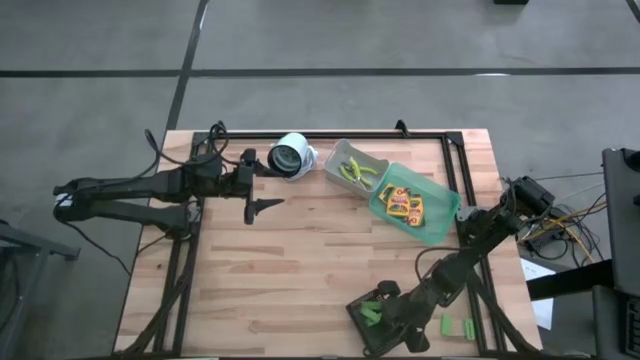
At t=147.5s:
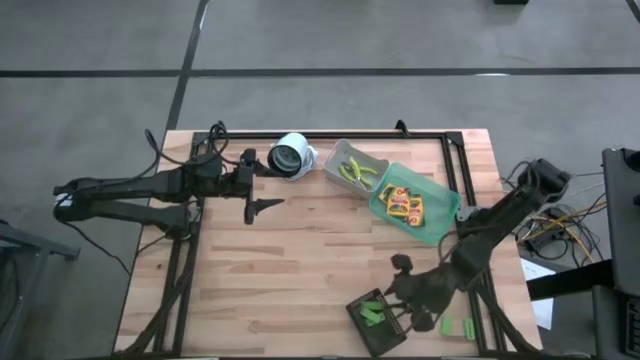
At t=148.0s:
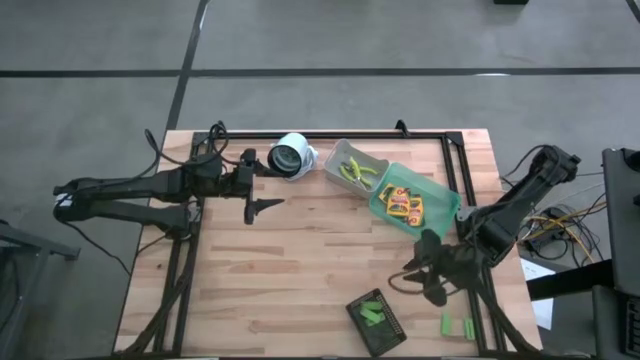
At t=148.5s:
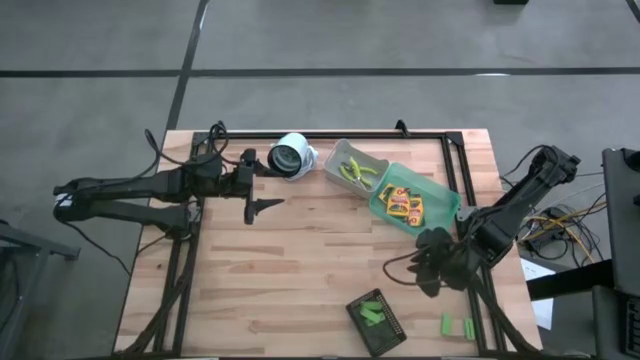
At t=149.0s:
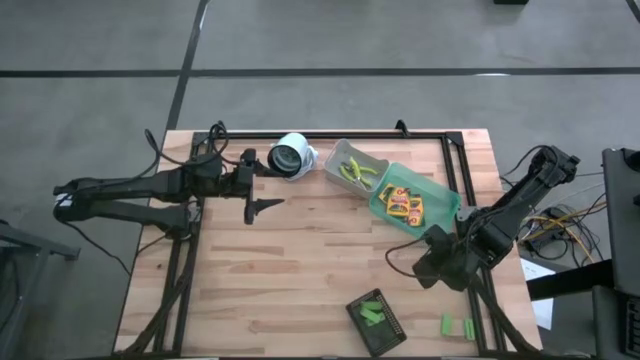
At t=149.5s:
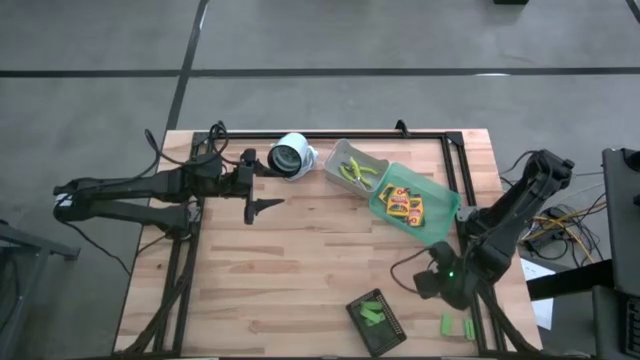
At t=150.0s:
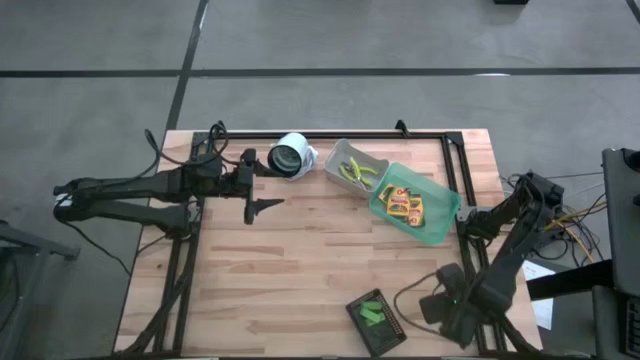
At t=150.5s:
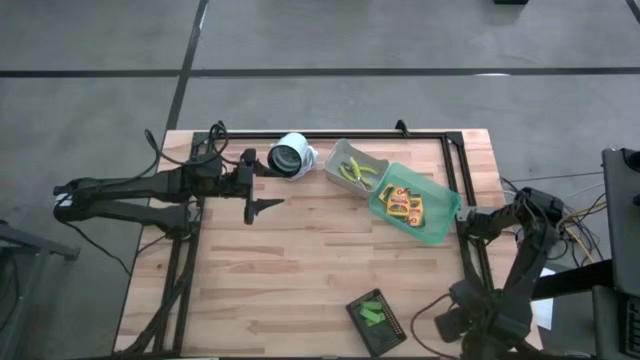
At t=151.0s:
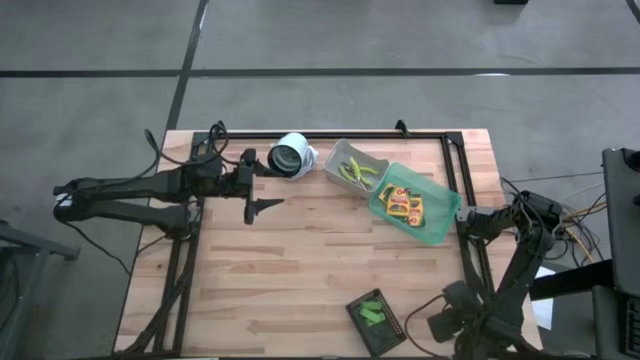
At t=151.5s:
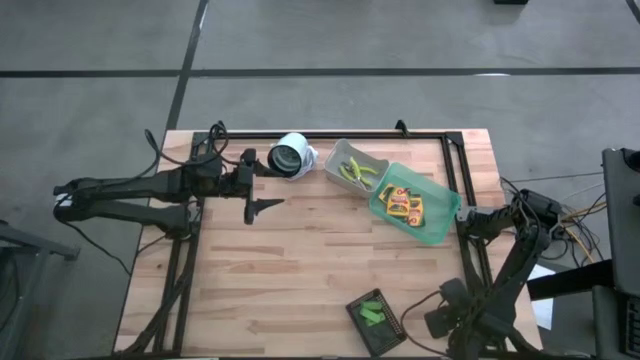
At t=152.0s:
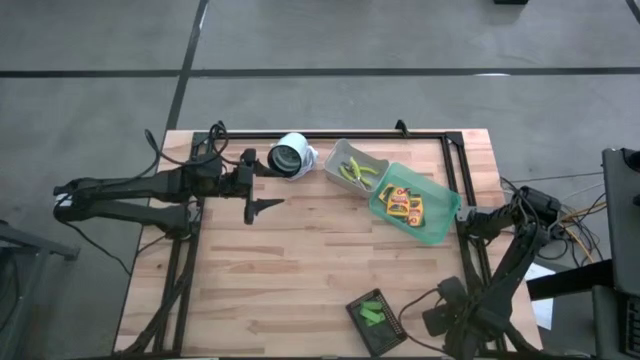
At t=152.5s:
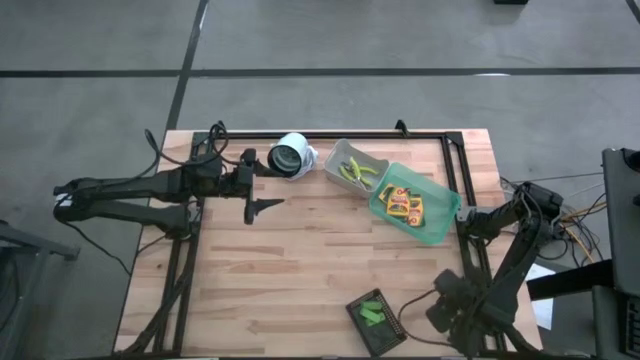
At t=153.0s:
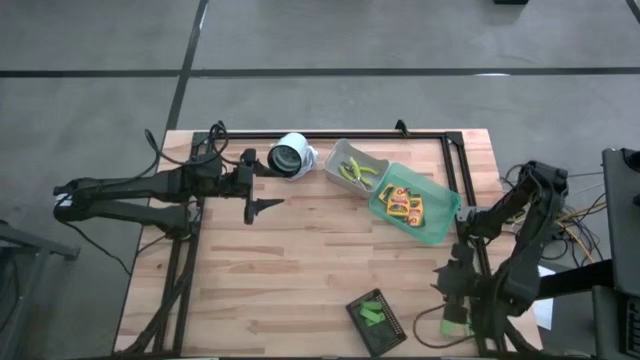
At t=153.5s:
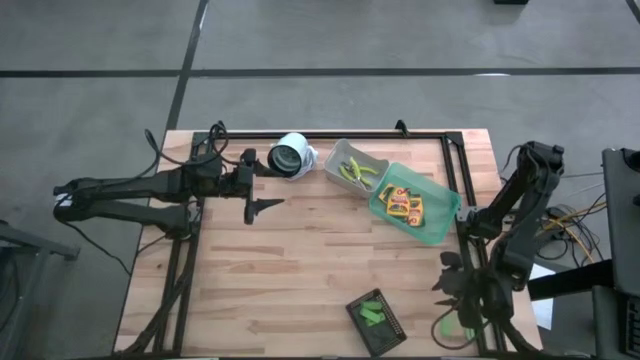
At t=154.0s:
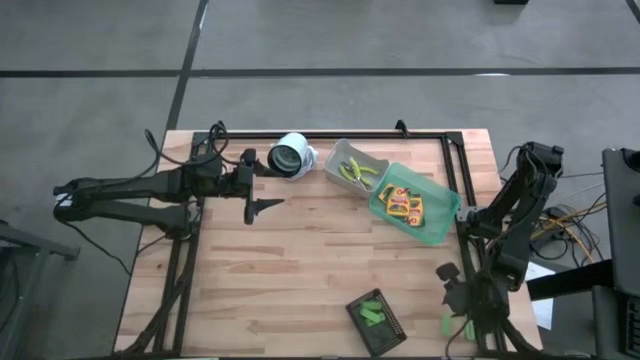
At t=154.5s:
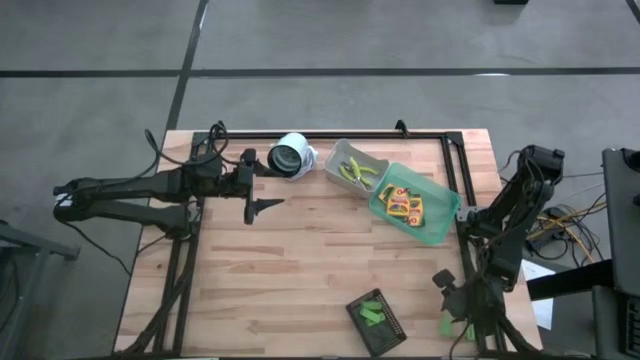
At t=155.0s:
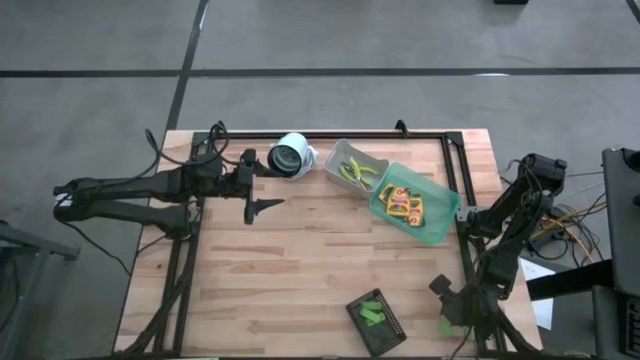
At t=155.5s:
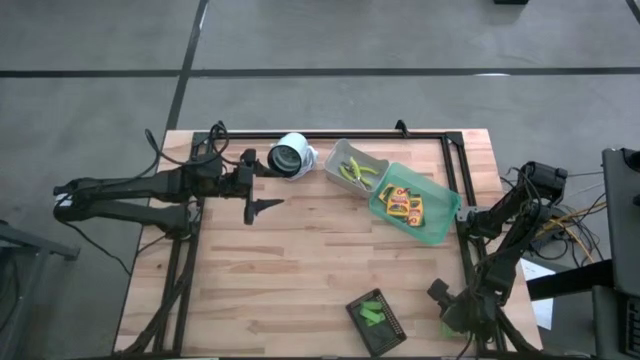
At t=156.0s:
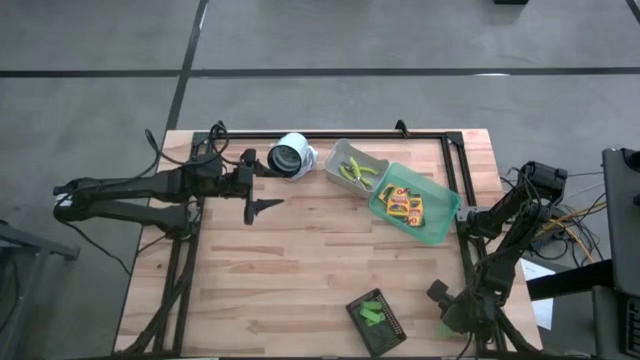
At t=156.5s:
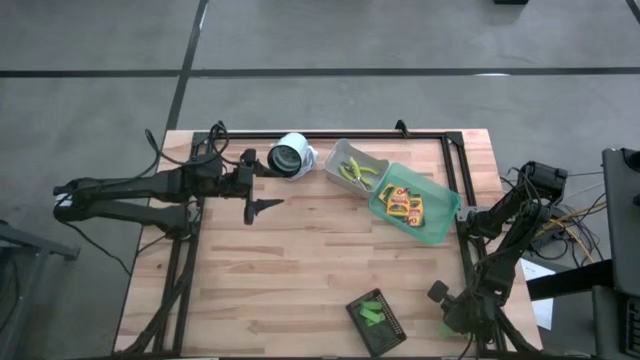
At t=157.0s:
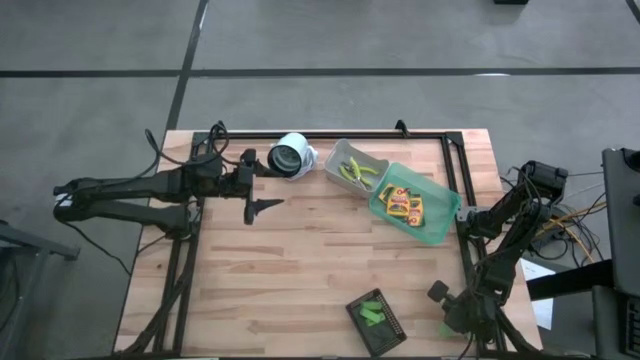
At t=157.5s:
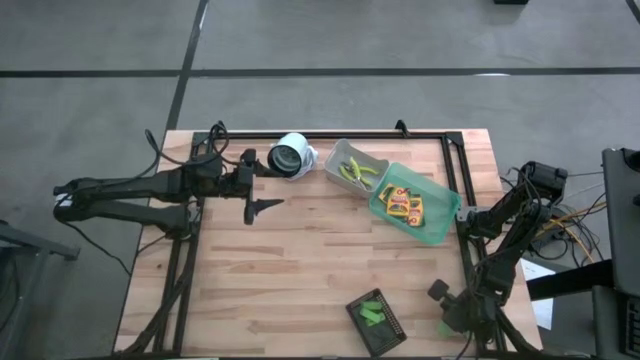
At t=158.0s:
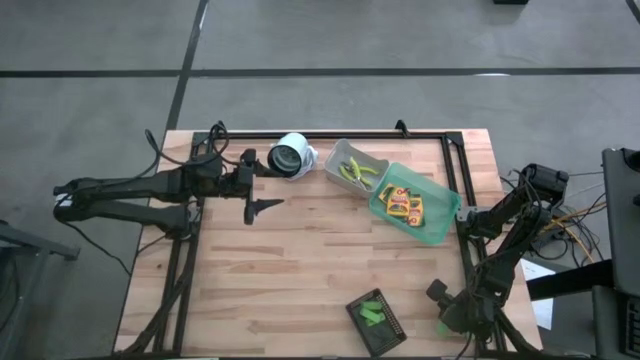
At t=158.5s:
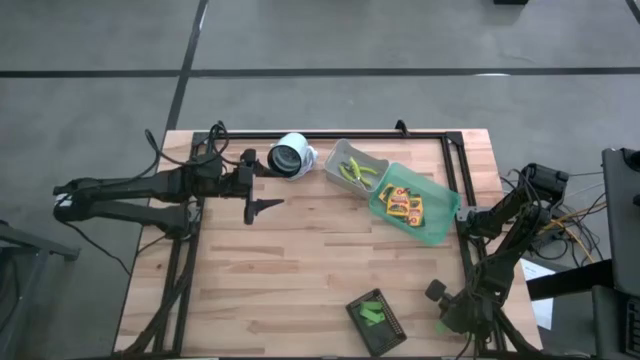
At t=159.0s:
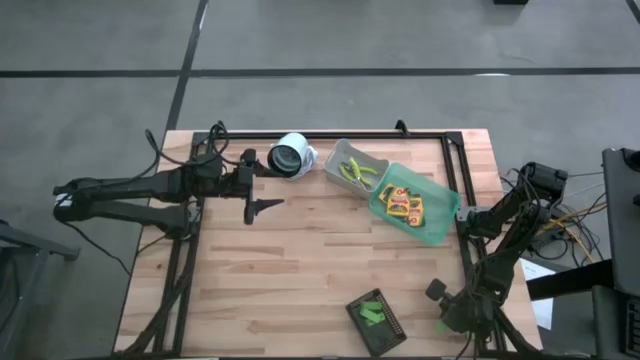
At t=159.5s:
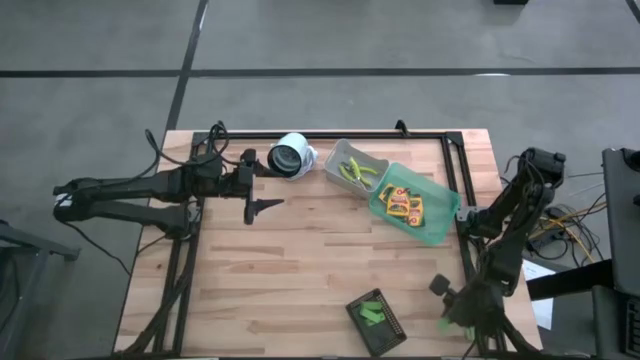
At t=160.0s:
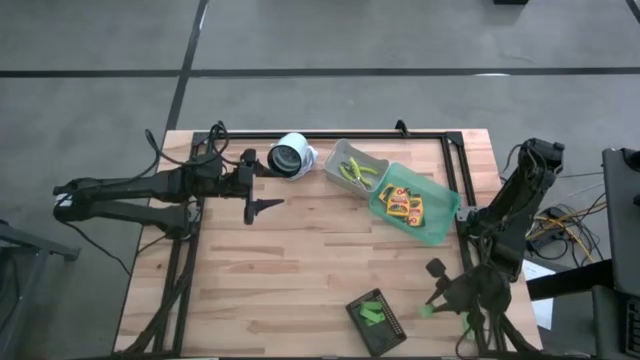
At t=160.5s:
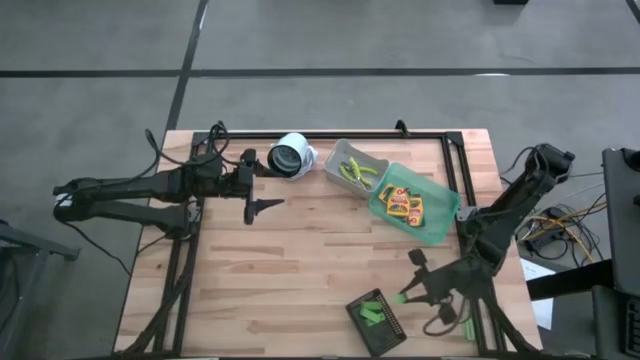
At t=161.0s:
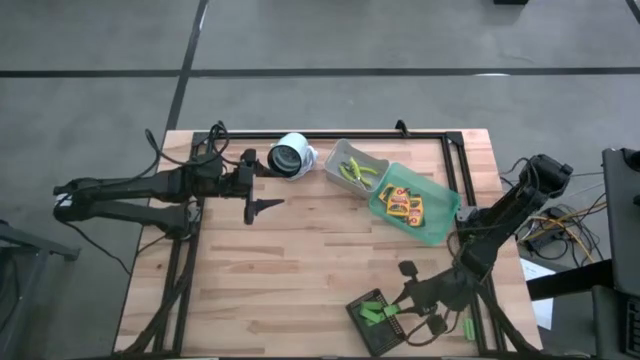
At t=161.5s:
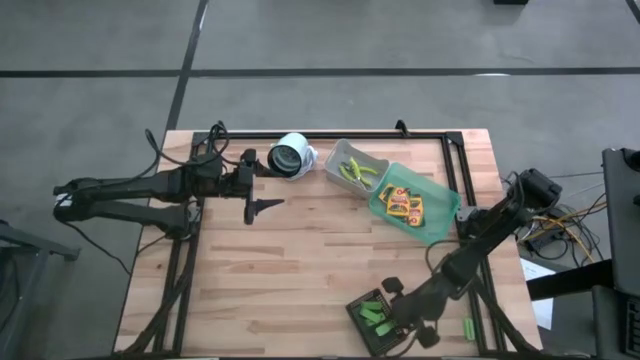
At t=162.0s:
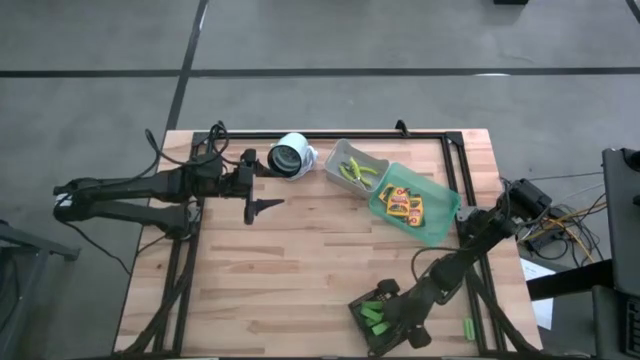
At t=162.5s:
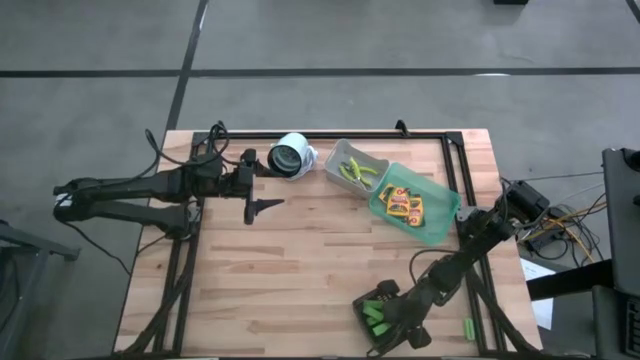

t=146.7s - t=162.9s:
Task: Pick & Place School Supplies
Put the green eraser into the black bin

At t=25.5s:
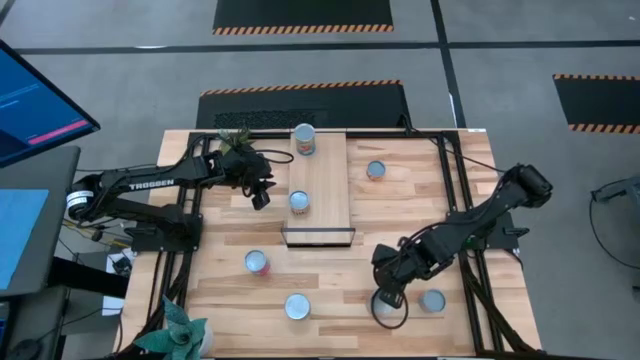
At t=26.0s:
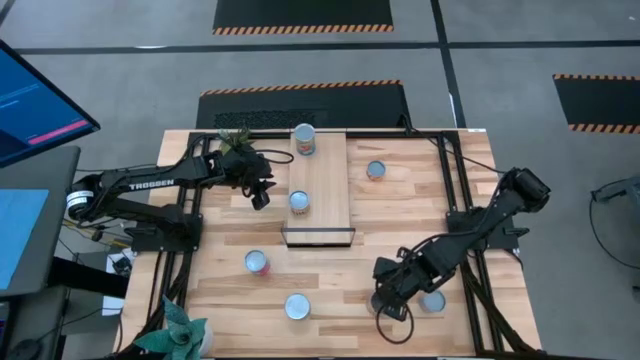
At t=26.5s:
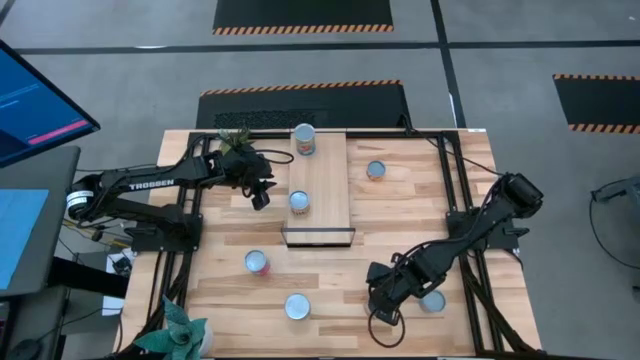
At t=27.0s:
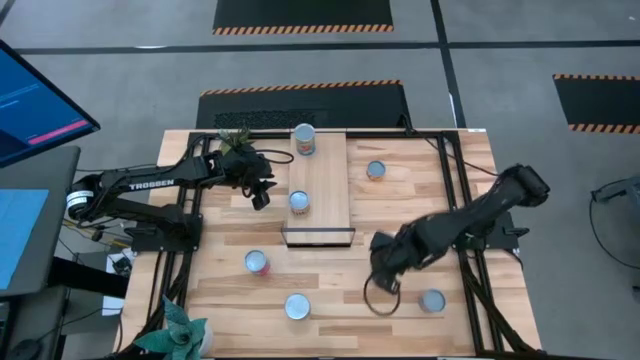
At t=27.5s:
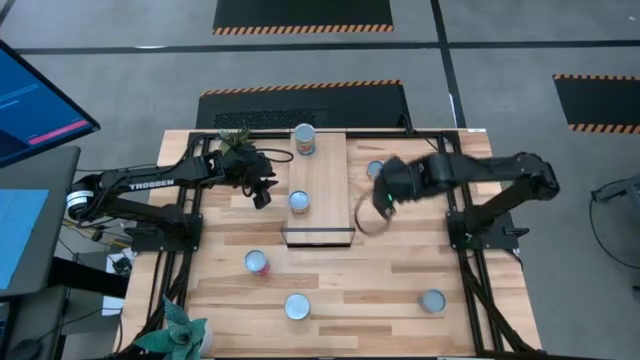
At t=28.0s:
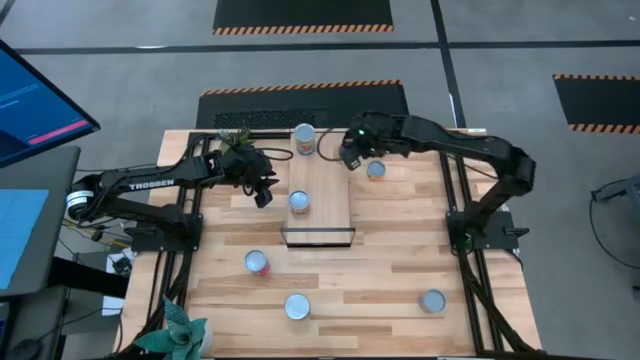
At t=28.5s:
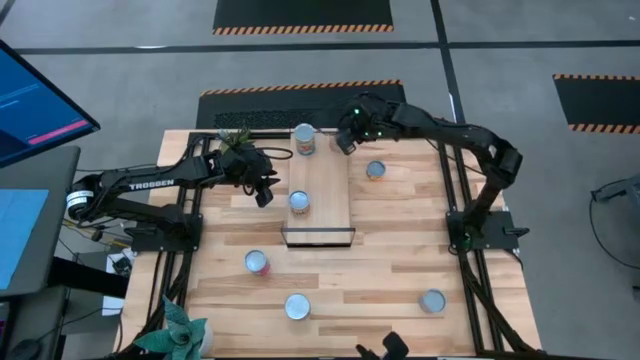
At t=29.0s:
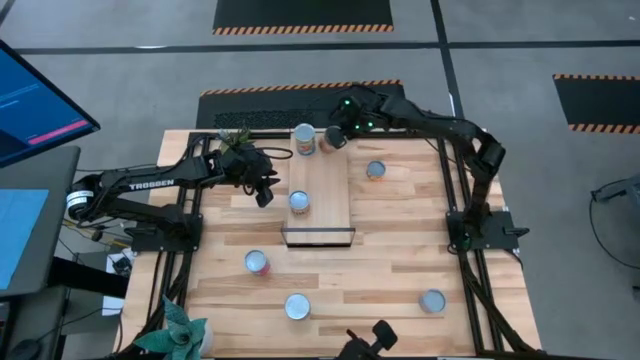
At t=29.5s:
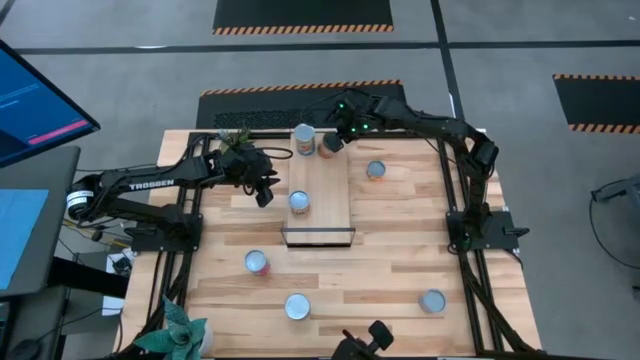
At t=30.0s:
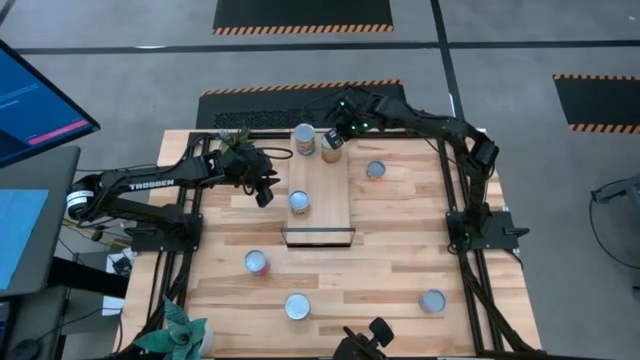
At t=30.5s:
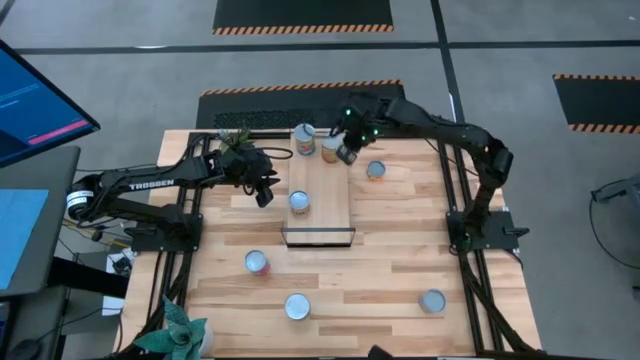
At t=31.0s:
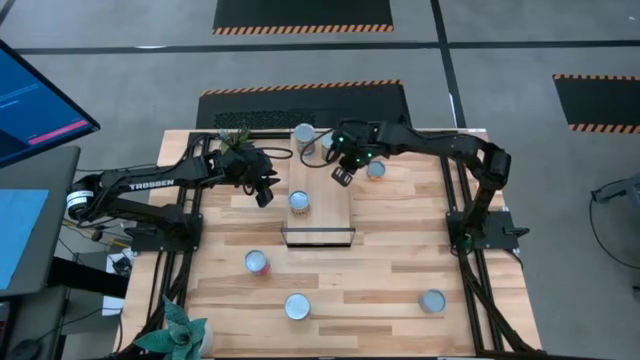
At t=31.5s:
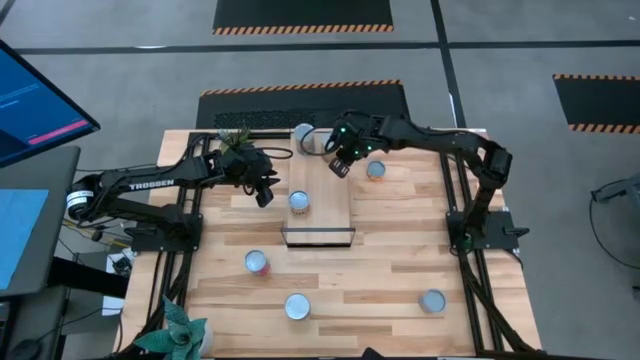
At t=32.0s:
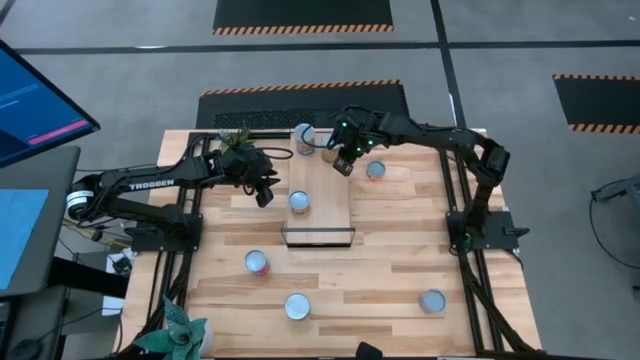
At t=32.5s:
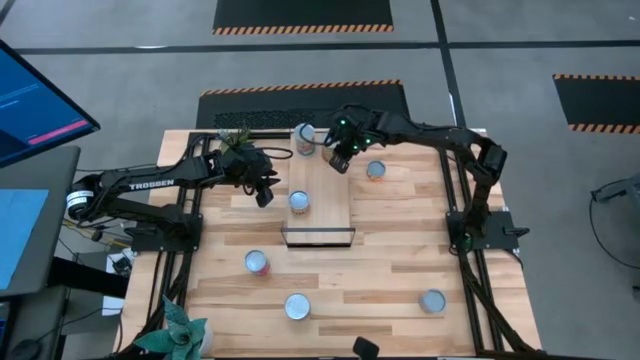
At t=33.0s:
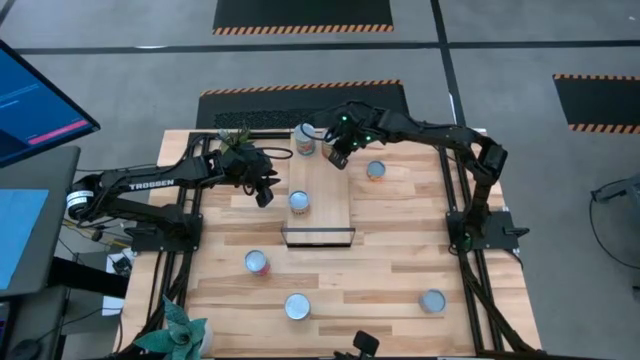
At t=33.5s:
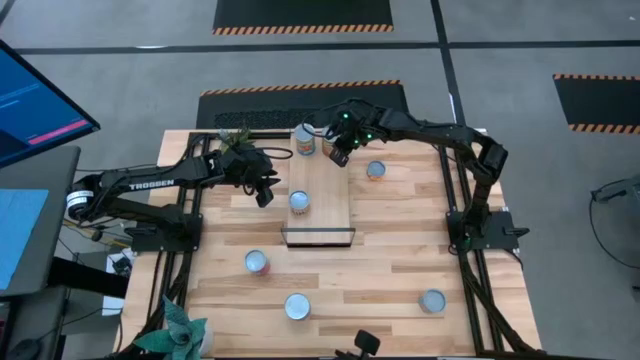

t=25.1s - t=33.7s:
Task: Pick and place cans onto a shelf
Put the canned green beans on the shelf
